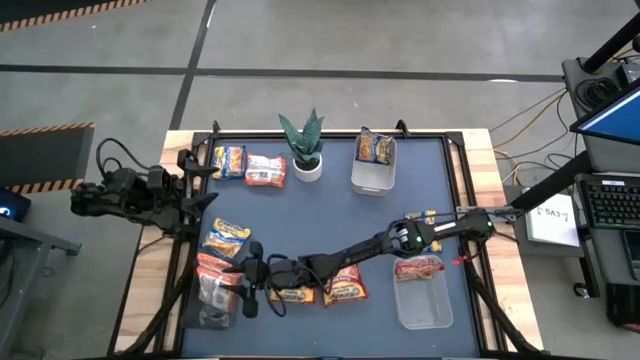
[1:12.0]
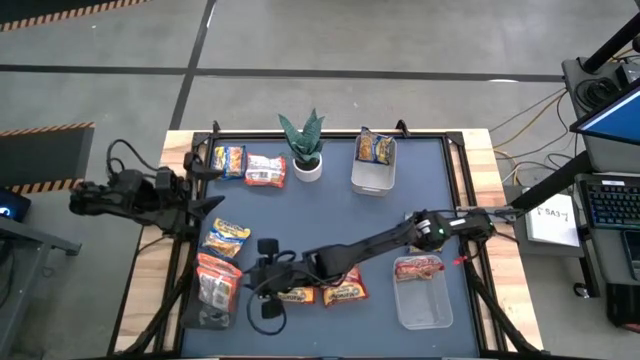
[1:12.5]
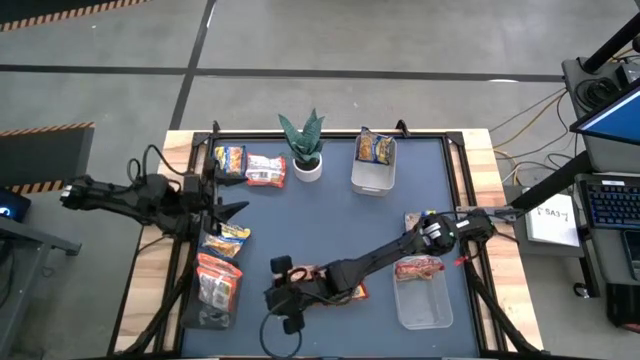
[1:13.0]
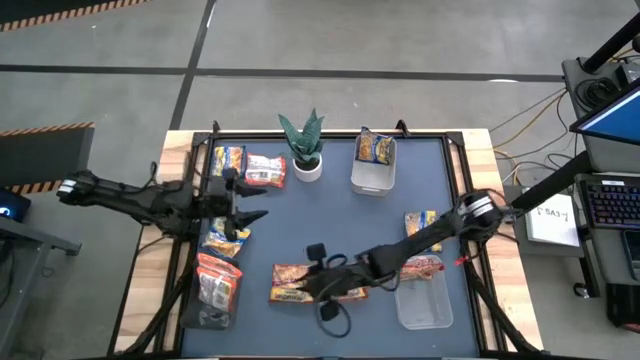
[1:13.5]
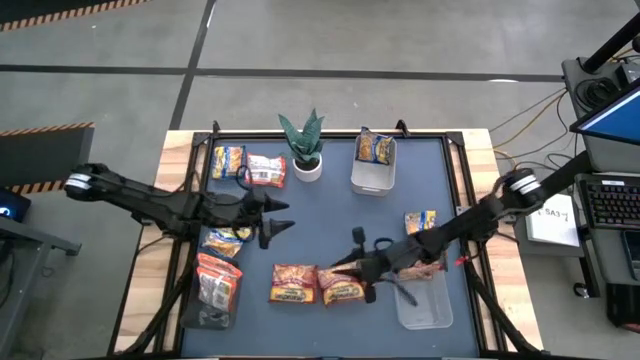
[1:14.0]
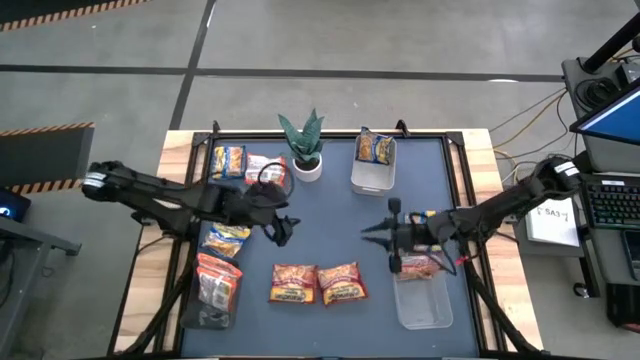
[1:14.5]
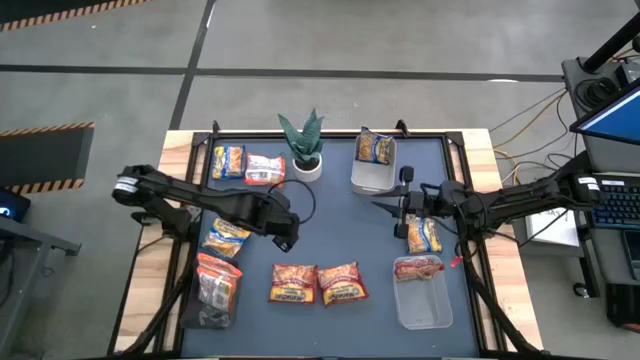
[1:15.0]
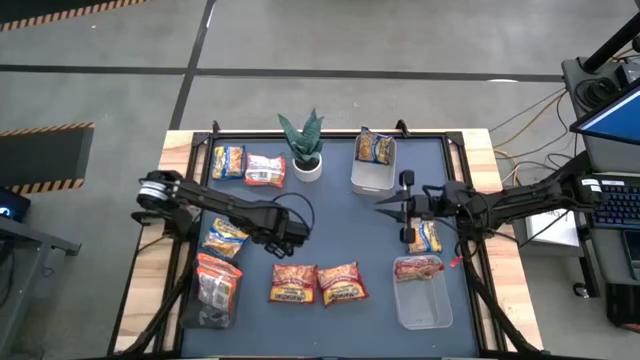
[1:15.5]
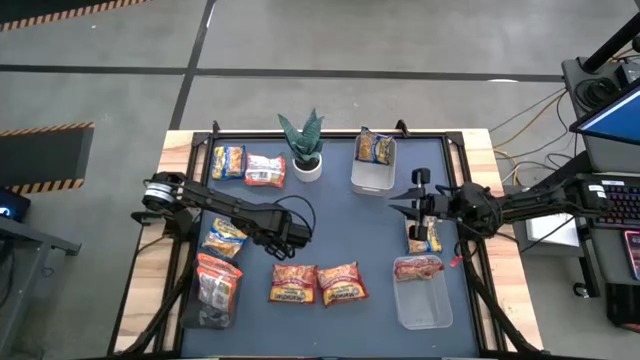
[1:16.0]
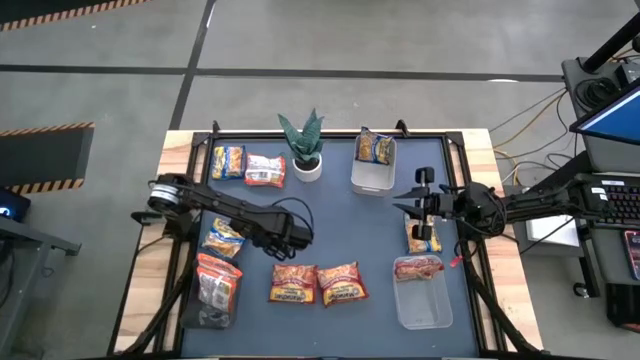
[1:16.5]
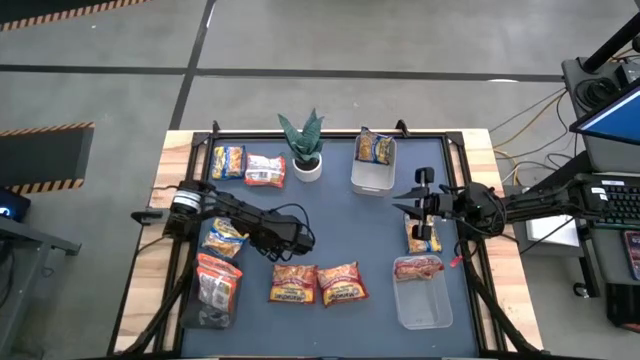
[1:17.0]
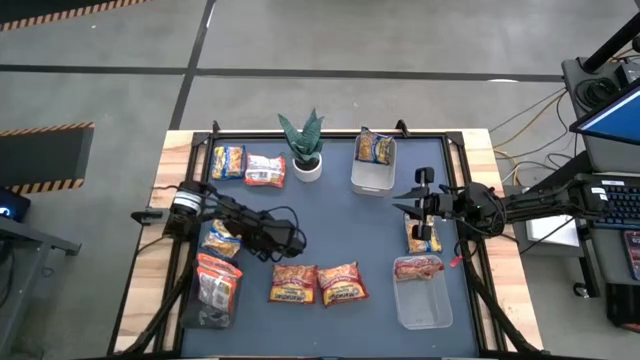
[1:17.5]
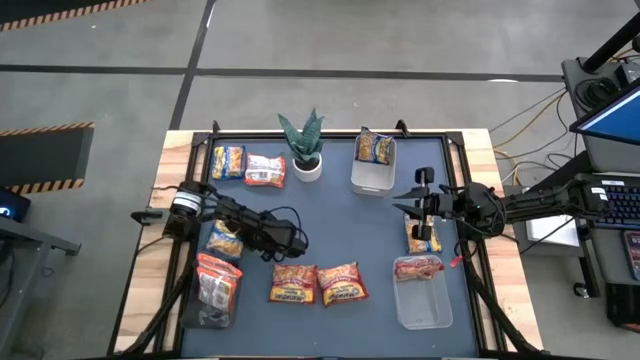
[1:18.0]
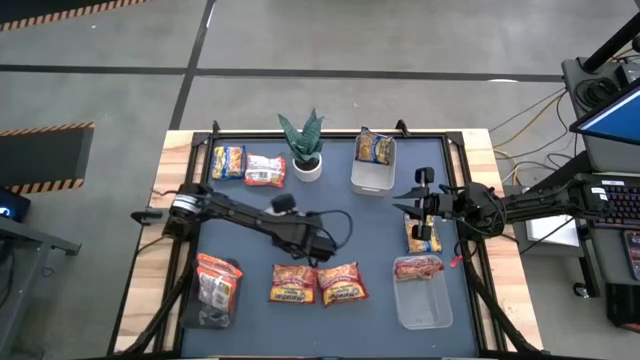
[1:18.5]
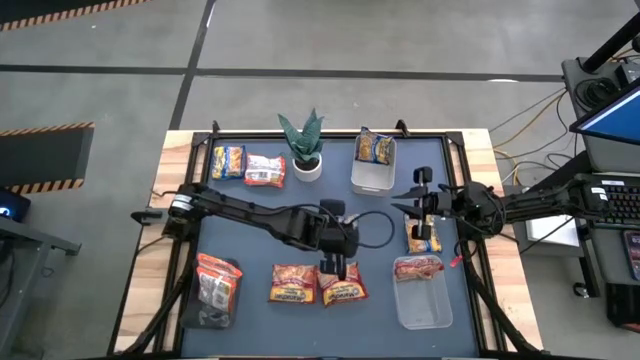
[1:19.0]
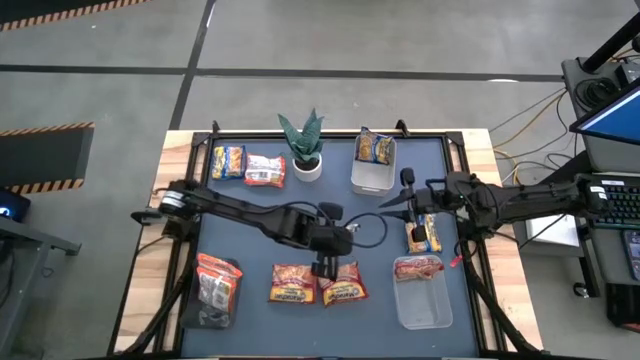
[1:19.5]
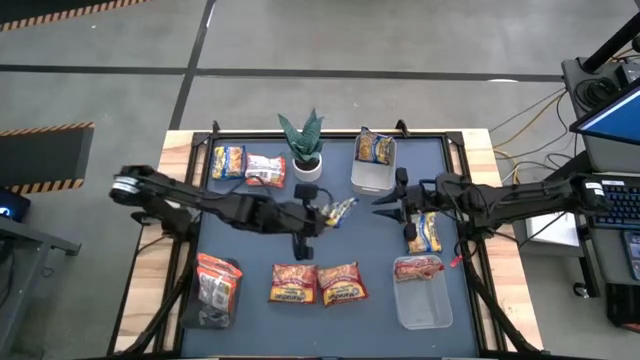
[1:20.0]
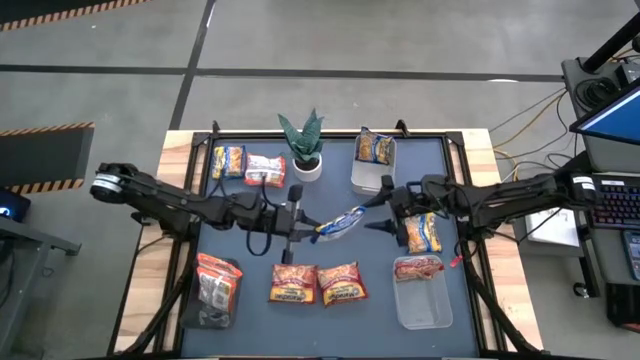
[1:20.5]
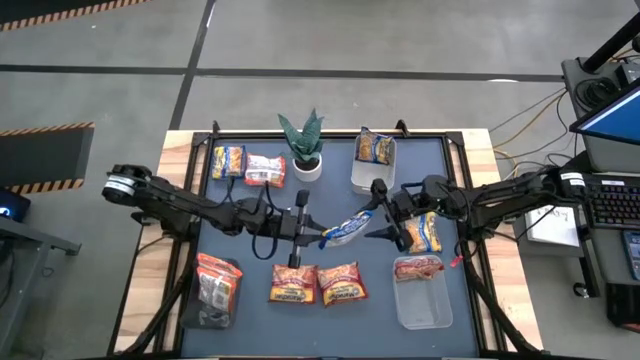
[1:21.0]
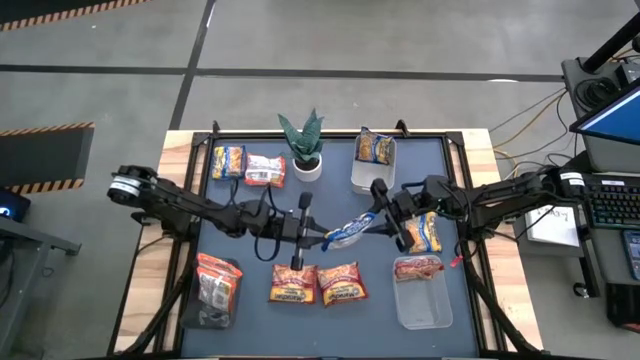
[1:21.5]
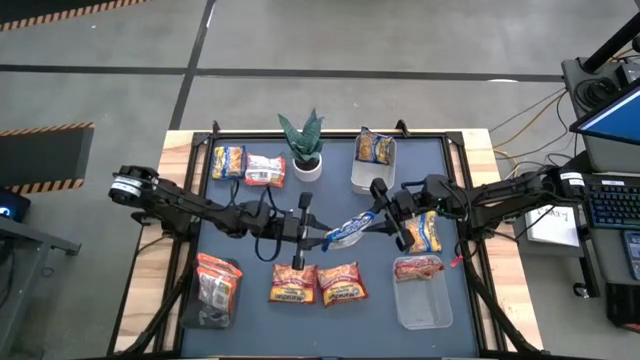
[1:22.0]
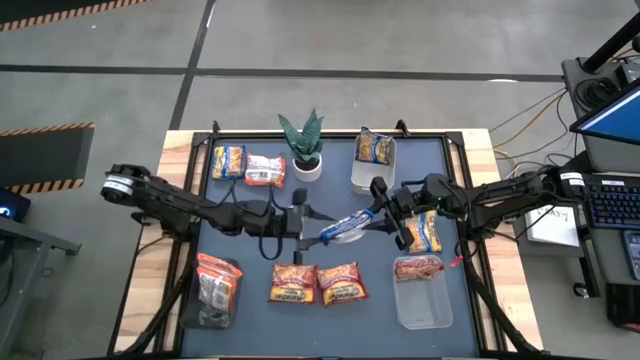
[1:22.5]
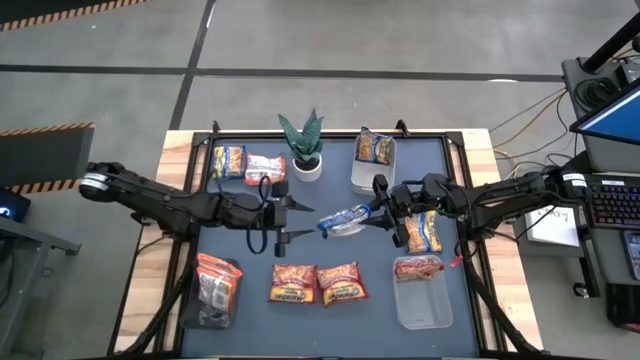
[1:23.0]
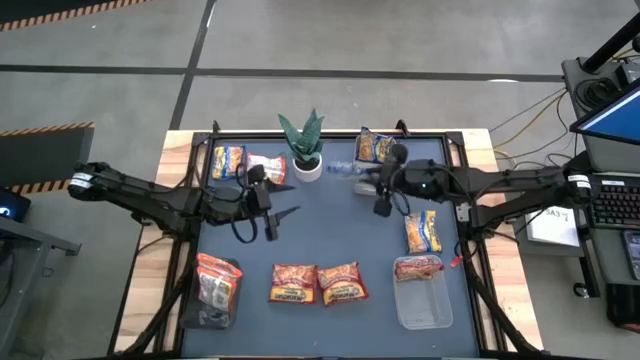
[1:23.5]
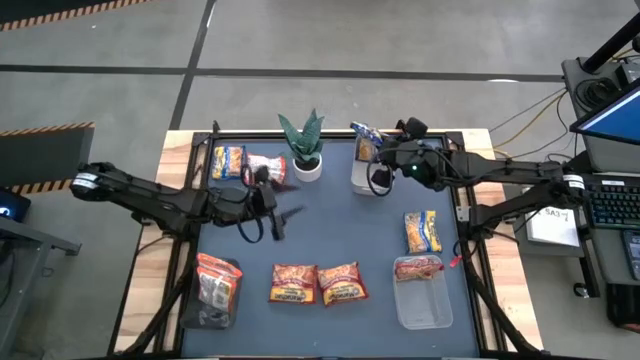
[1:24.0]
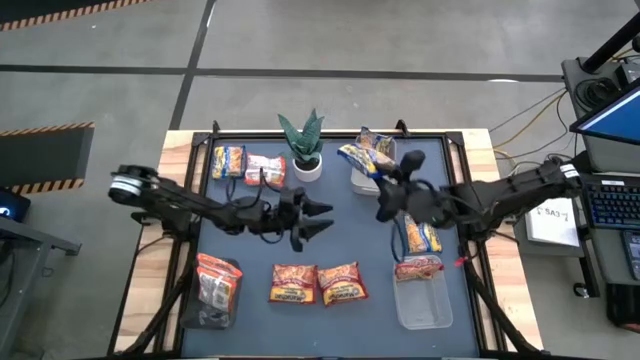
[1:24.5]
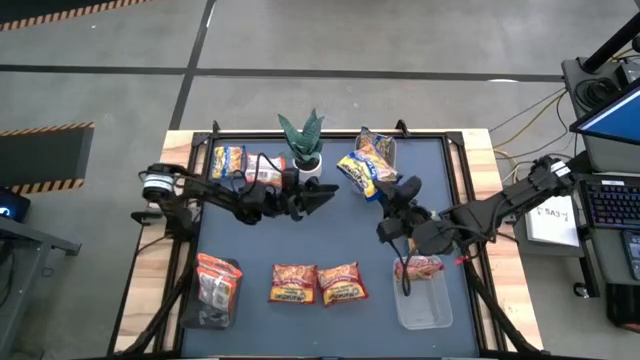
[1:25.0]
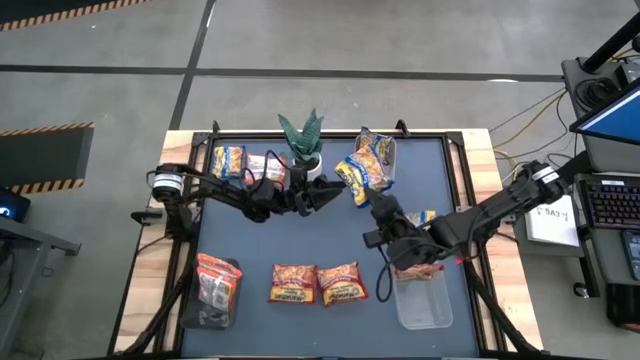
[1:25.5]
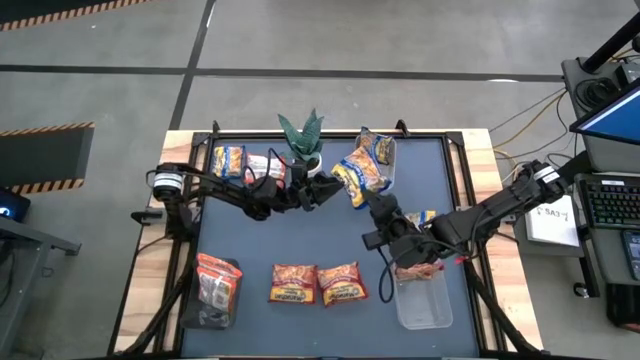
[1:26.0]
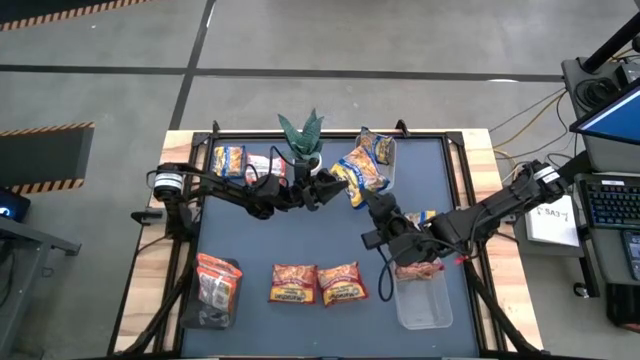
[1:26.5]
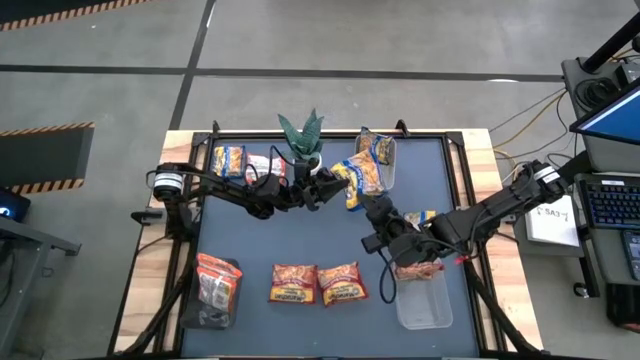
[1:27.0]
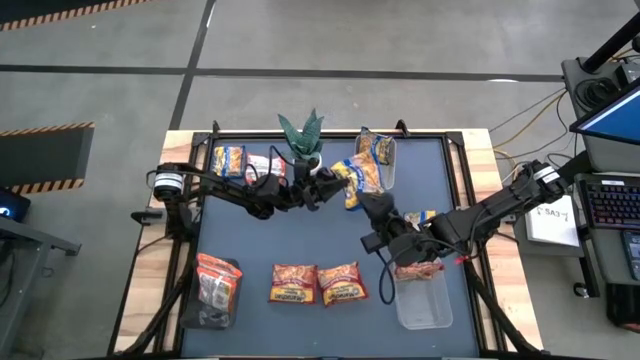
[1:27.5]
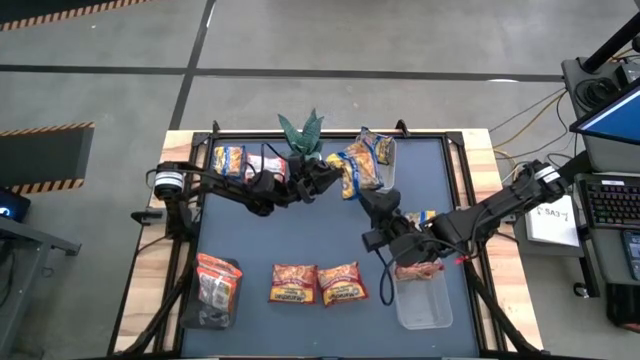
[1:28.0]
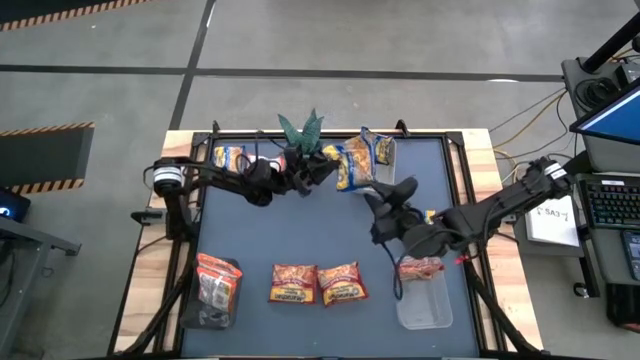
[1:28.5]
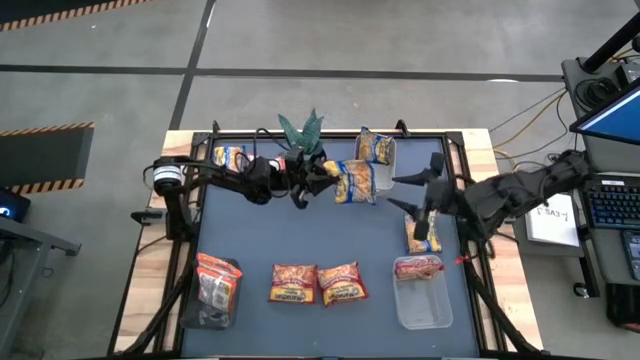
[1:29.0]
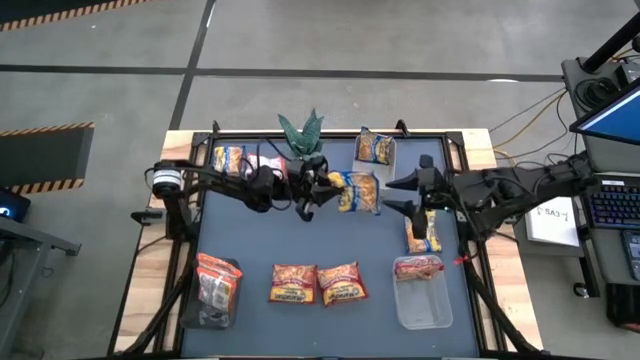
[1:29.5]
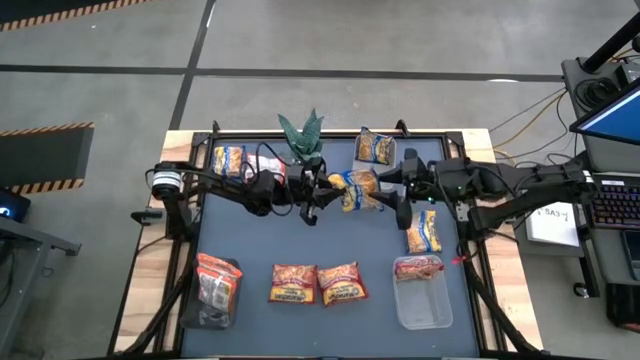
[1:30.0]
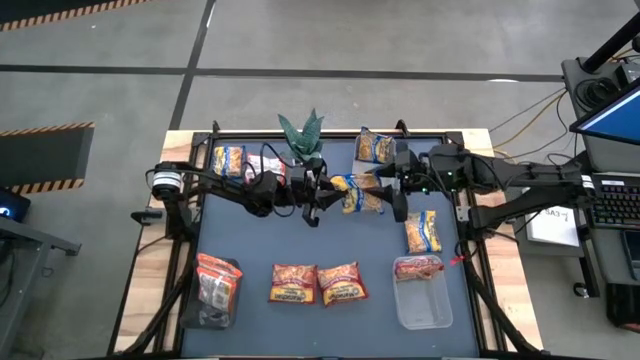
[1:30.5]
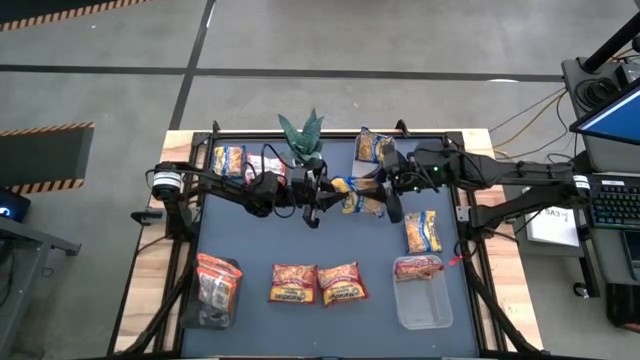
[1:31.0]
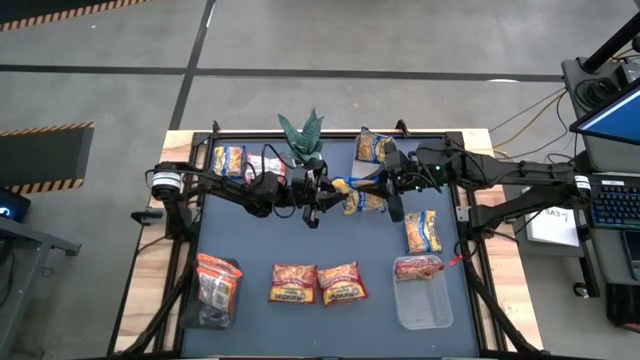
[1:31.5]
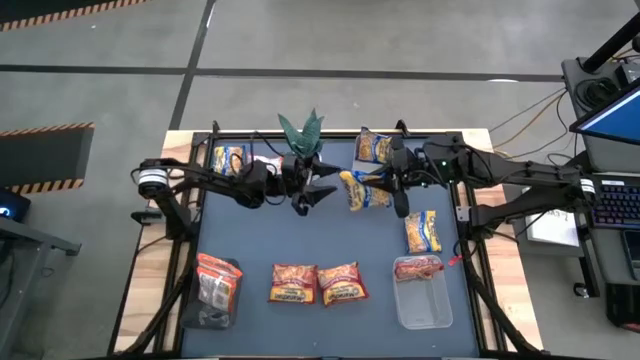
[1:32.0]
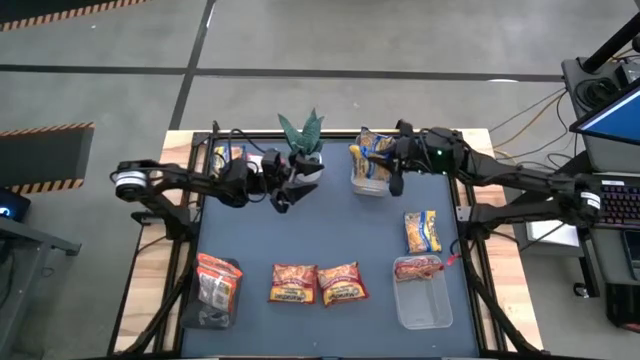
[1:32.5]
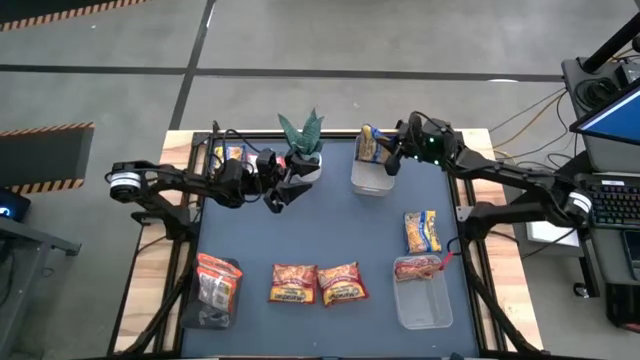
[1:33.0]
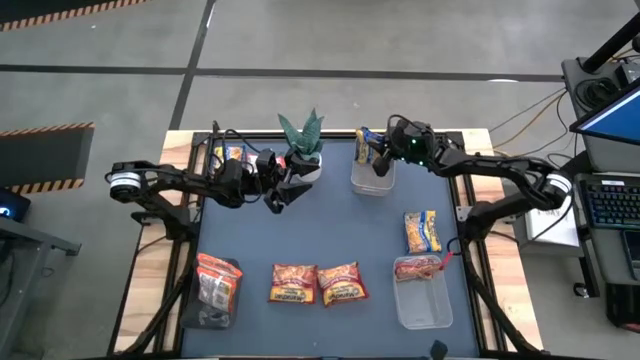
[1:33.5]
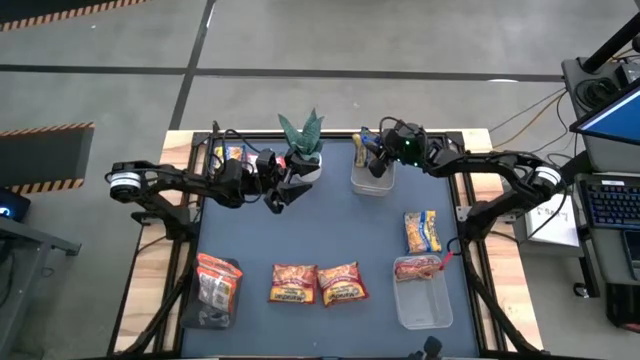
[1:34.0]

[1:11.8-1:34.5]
Task: Sort Maruchan noodles
Put the bottom left blue instant noodle pack into the gray bin
